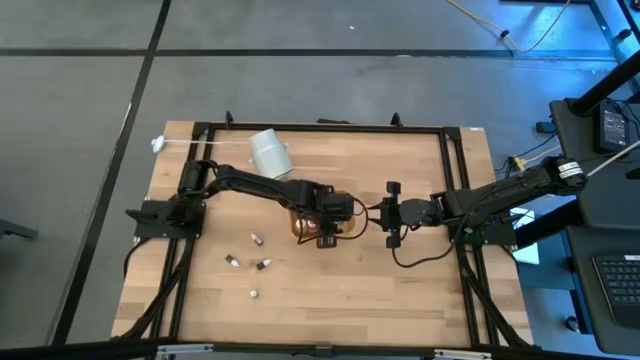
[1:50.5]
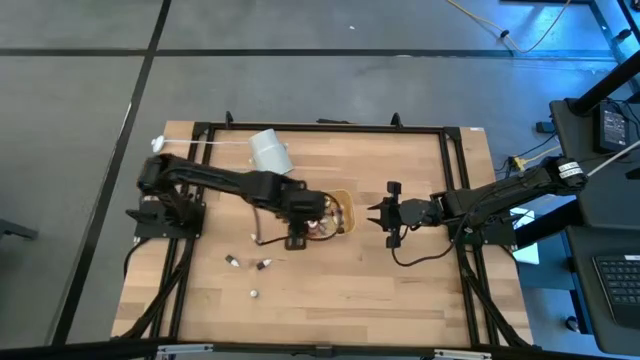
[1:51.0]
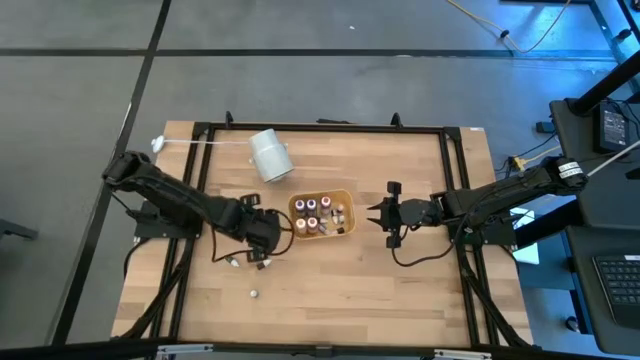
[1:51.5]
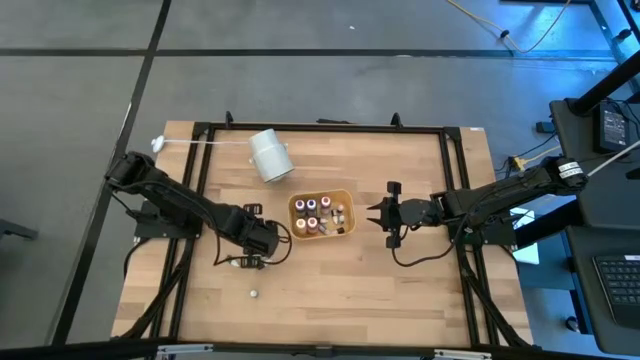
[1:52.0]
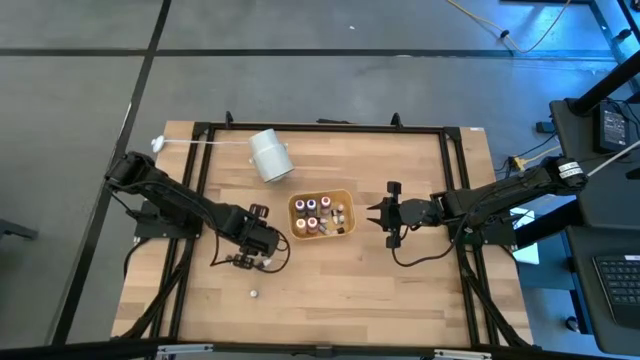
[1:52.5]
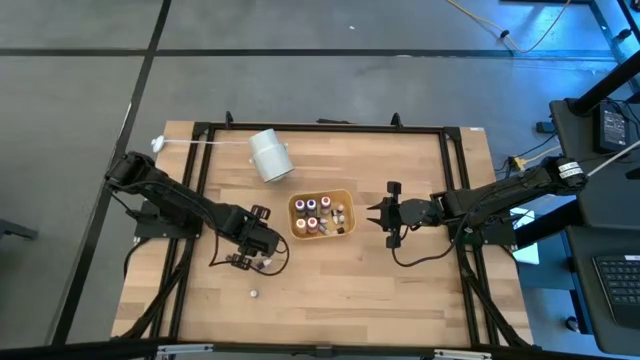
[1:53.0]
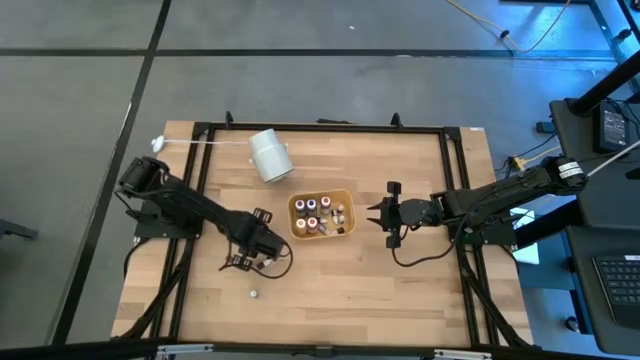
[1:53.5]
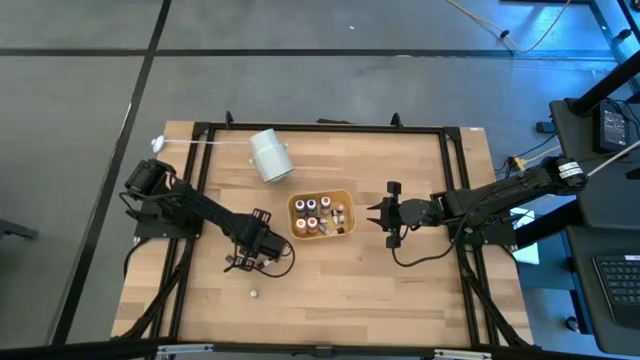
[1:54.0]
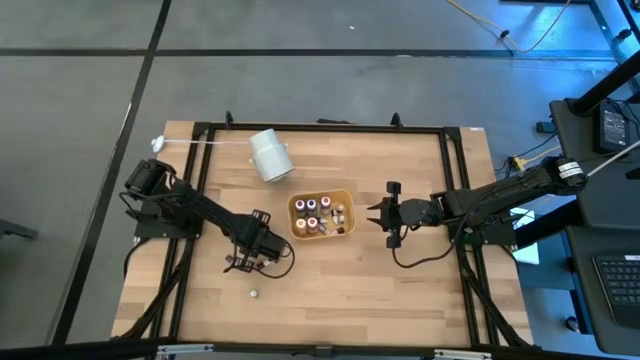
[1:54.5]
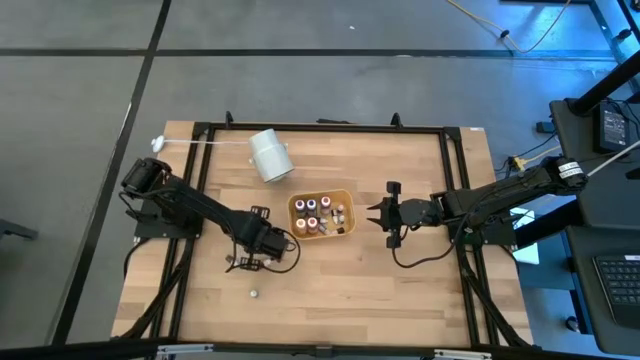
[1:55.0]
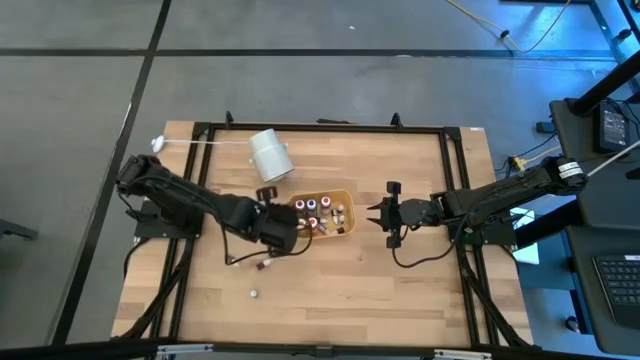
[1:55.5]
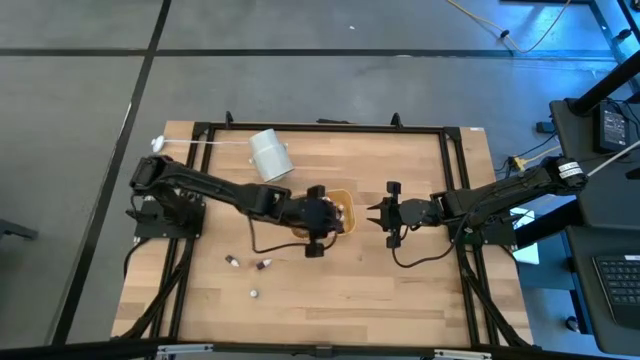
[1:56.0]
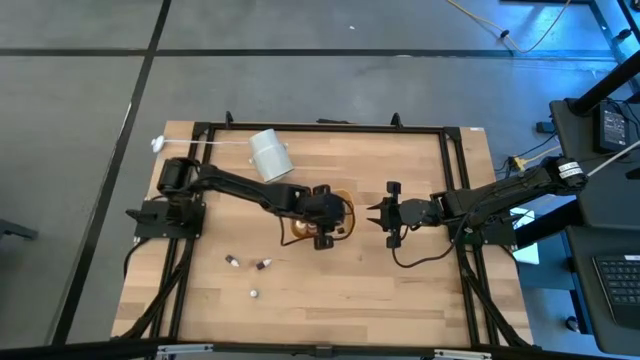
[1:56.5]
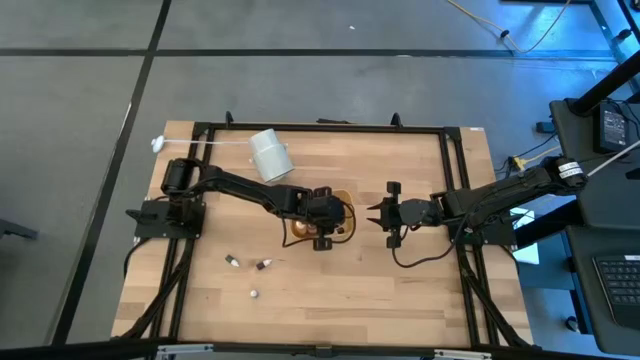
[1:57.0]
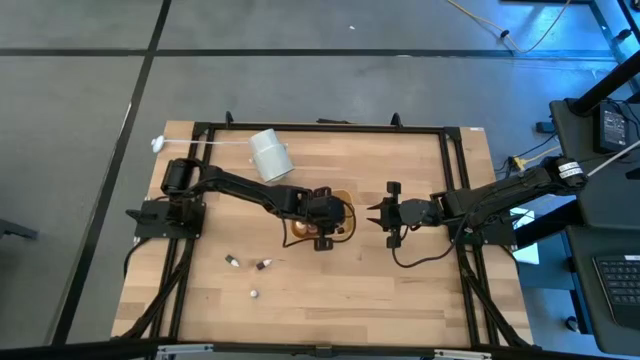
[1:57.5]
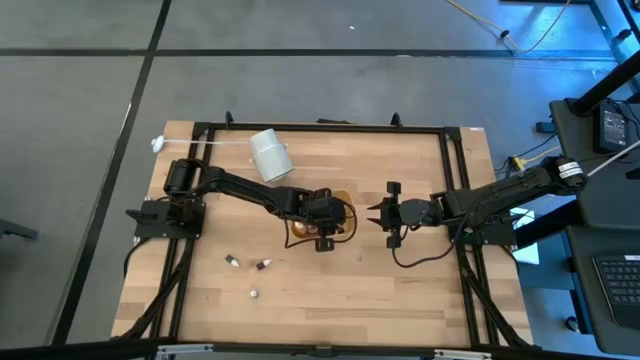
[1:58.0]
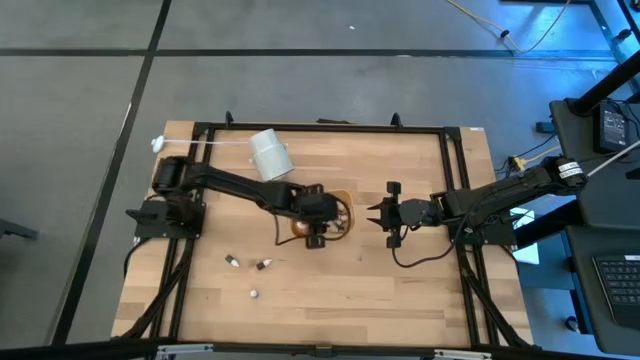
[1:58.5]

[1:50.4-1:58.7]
Task: Pick & Place food coloring
Put the small black ink bottle into the yellow bin

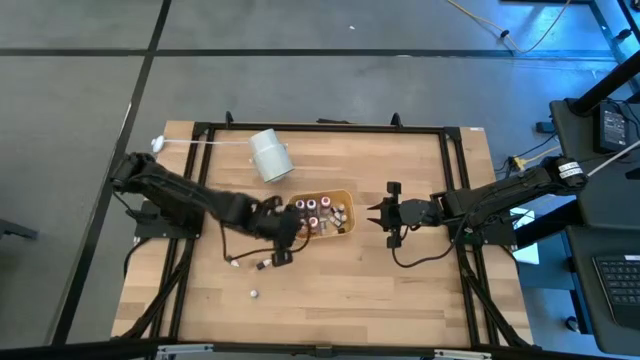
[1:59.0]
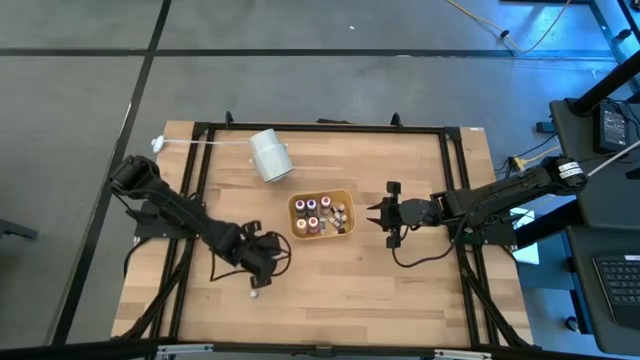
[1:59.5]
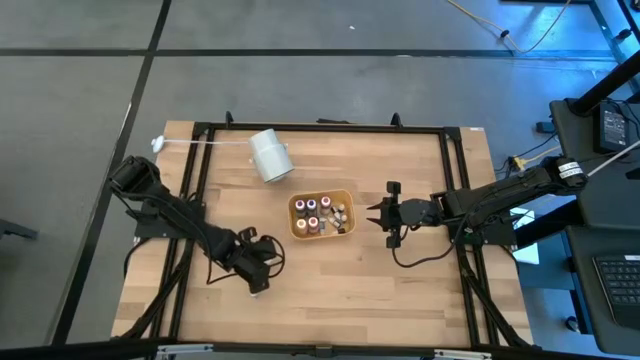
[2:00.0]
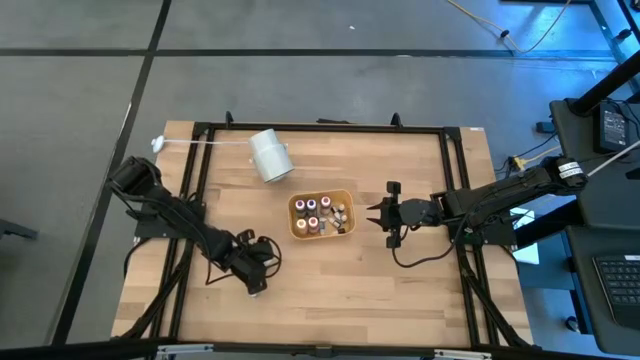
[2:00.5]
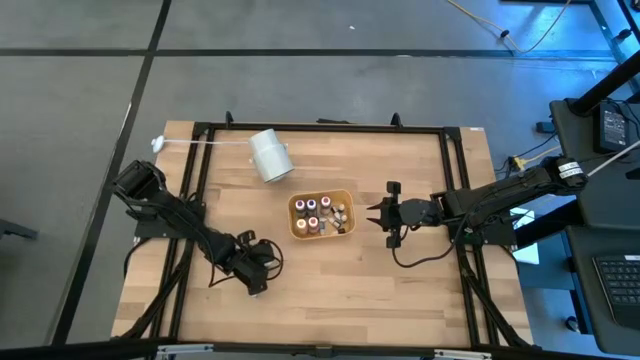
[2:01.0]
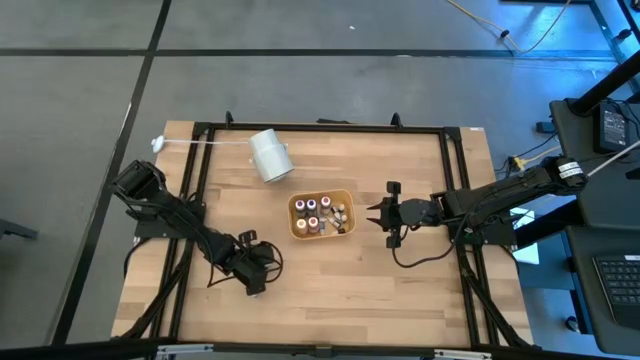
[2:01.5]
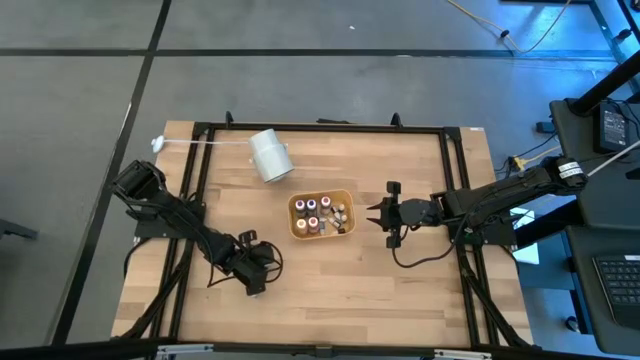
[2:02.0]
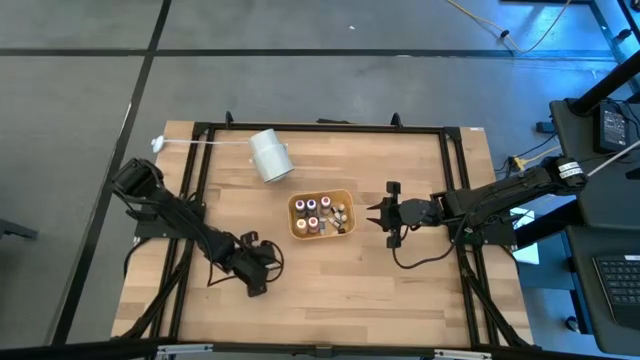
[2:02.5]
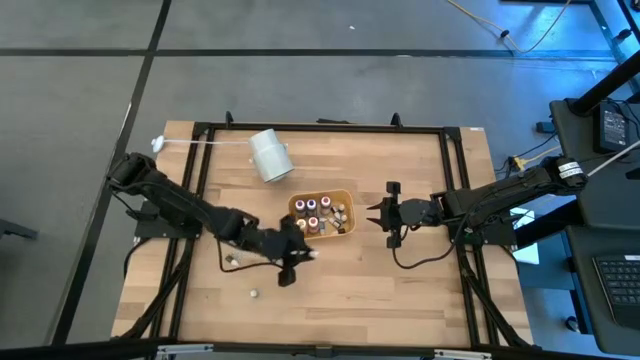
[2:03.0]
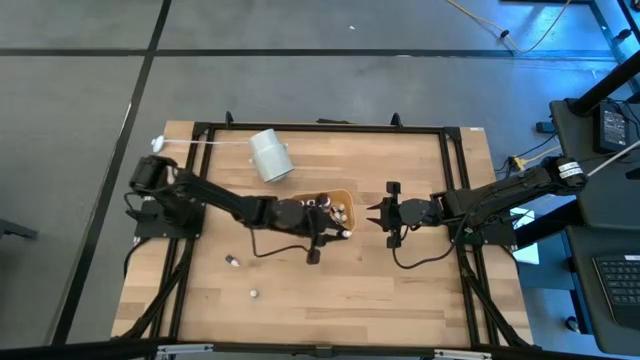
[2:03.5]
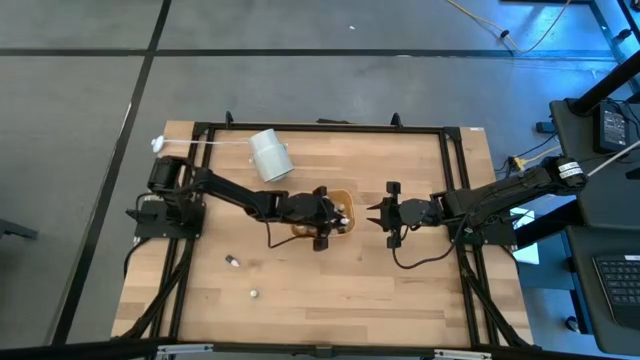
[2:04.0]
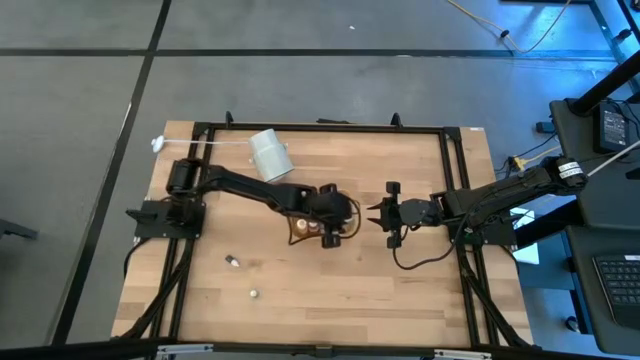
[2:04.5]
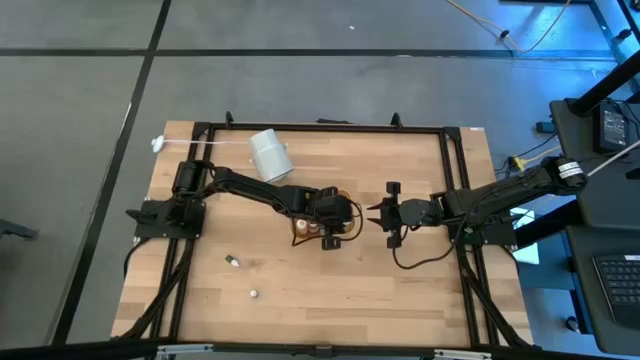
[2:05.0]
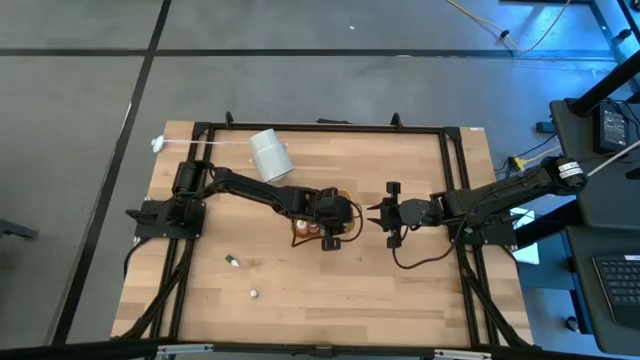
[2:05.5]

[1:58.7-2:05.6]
Put the right small black ink bottle into the yellow bin

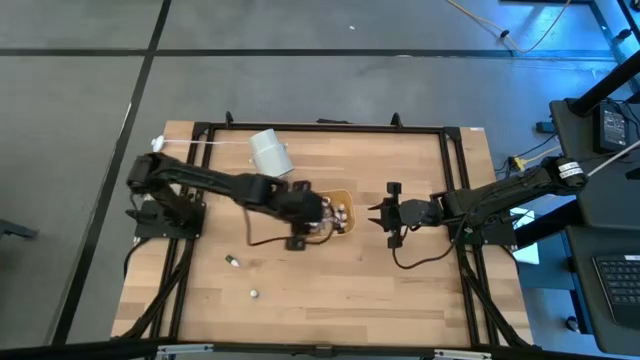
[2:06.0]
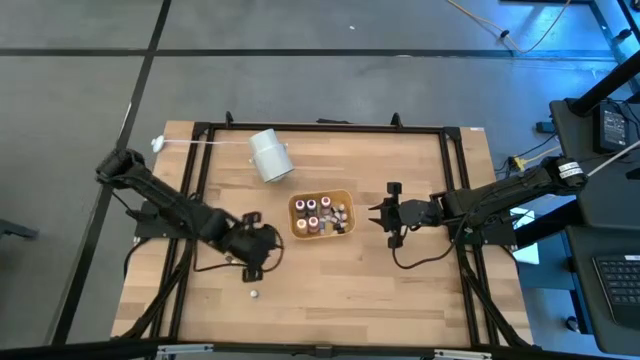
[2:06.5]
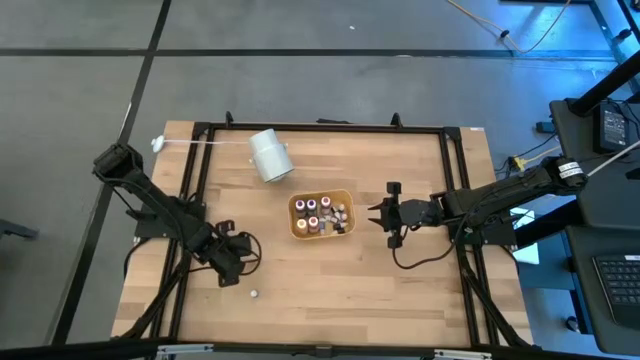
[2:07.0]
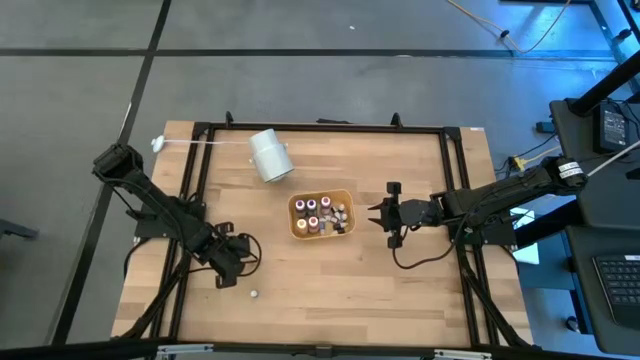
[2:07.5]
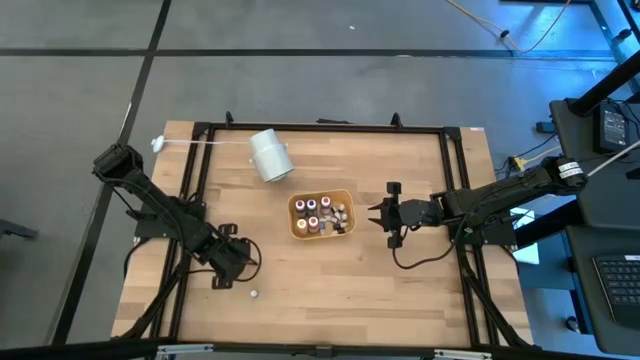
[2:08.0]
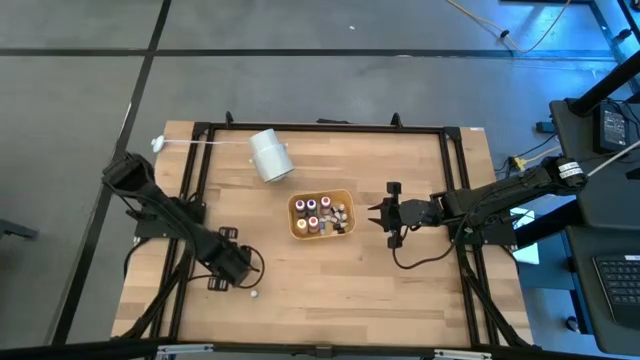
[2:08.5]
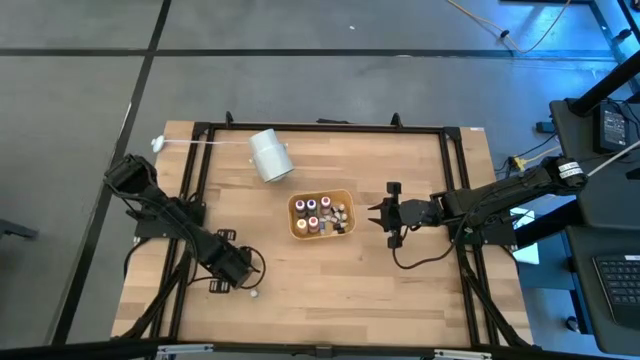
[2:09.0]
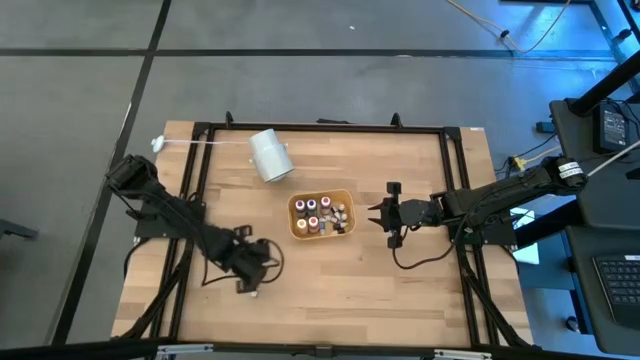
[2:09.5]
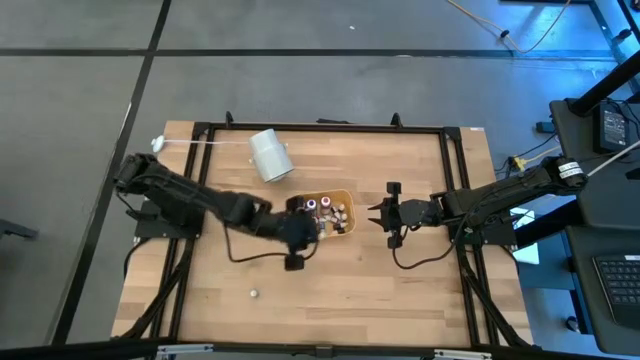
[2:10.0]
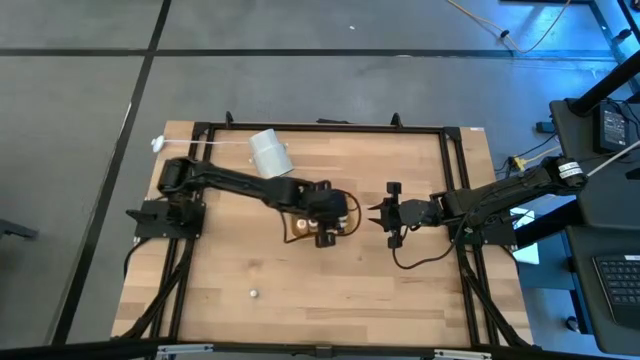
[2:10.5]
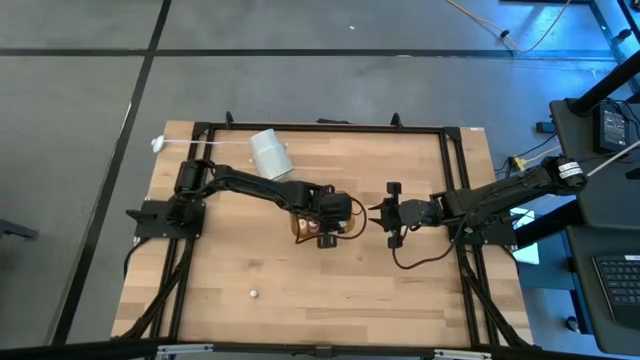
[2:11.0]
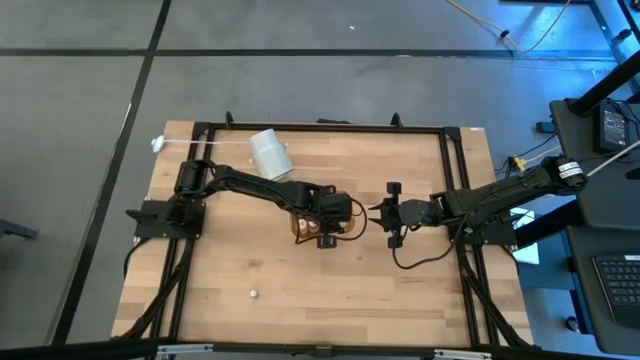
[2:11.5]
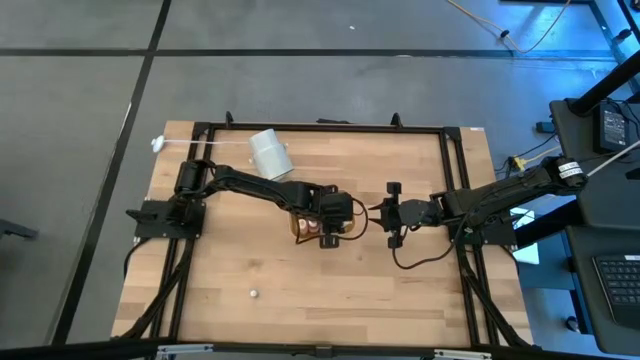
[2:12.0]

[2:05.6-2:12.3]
Put the left small black ink bottle into the yellow bin
